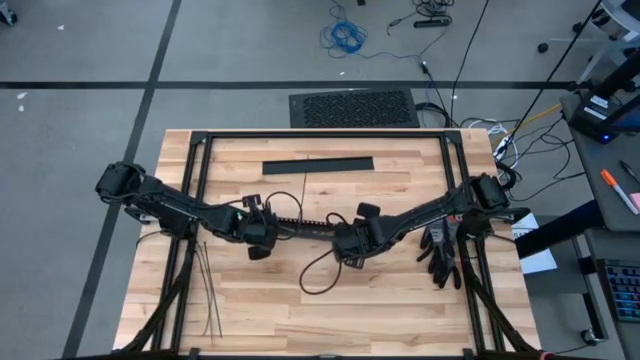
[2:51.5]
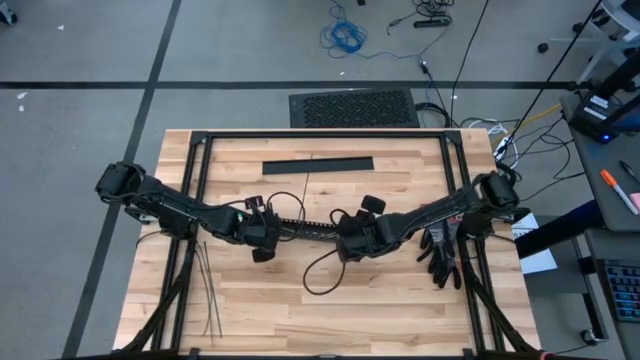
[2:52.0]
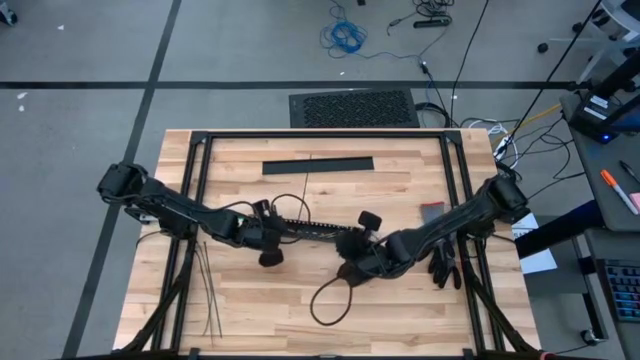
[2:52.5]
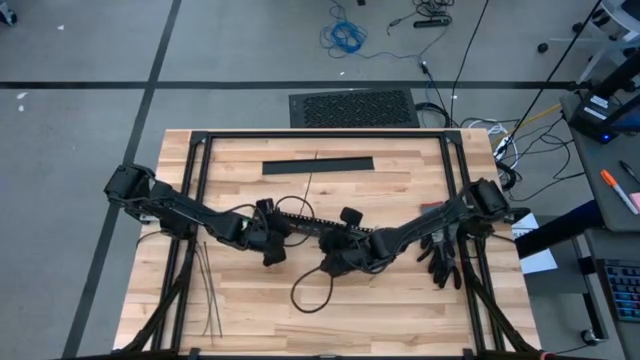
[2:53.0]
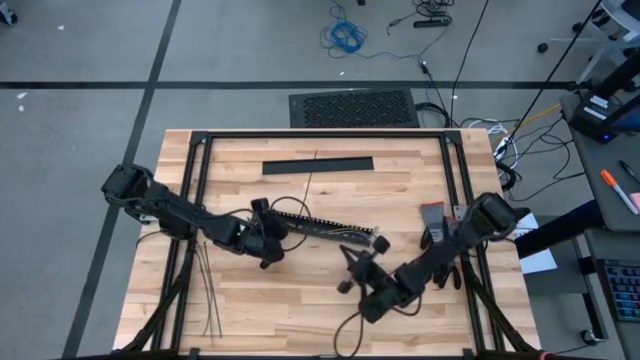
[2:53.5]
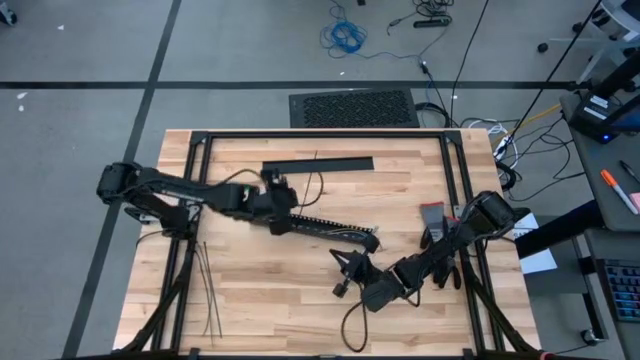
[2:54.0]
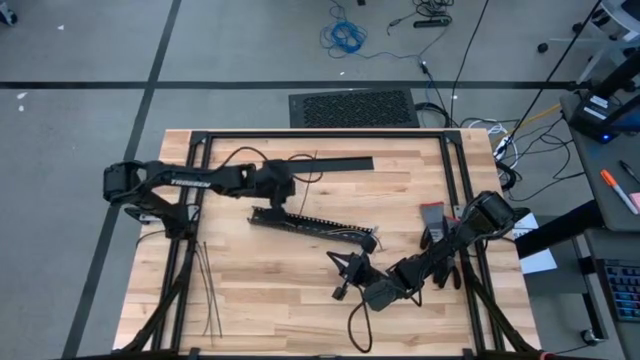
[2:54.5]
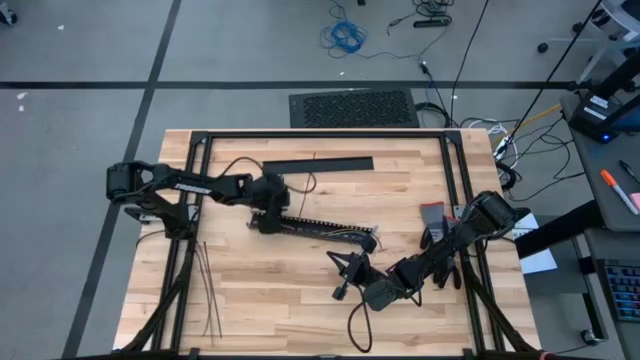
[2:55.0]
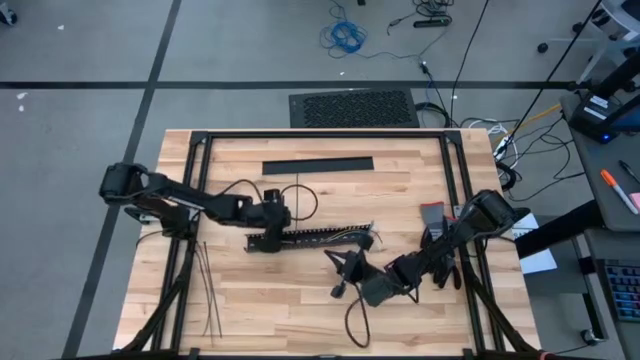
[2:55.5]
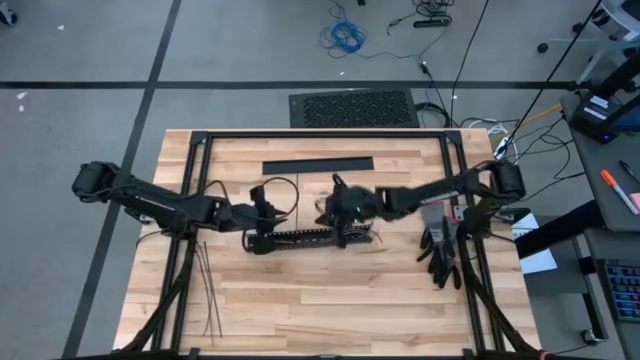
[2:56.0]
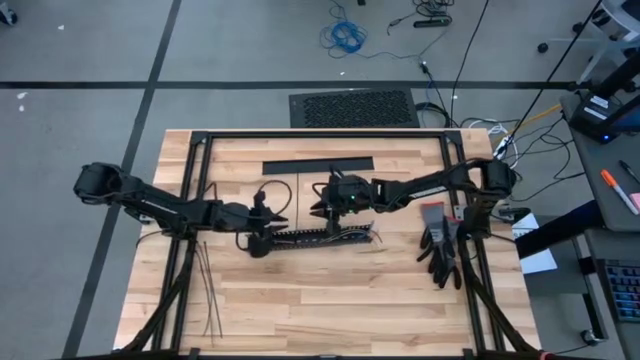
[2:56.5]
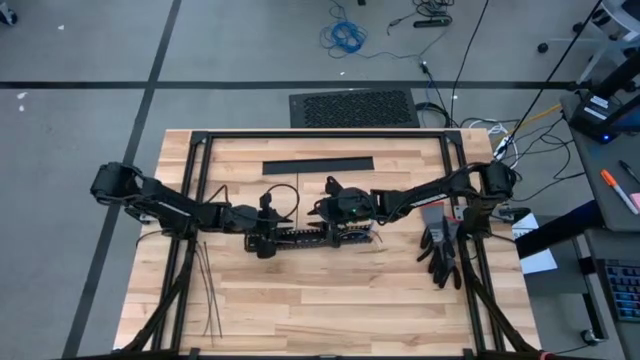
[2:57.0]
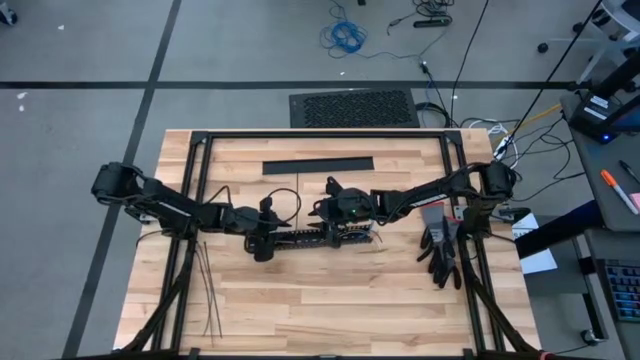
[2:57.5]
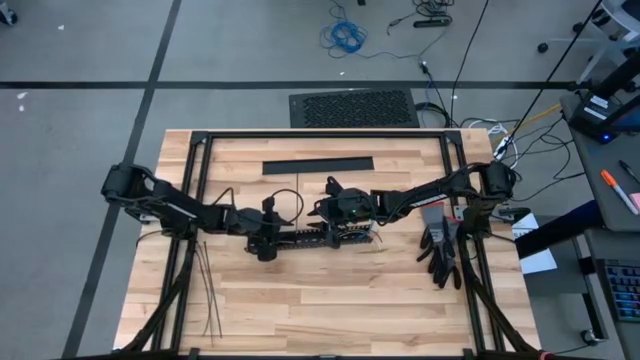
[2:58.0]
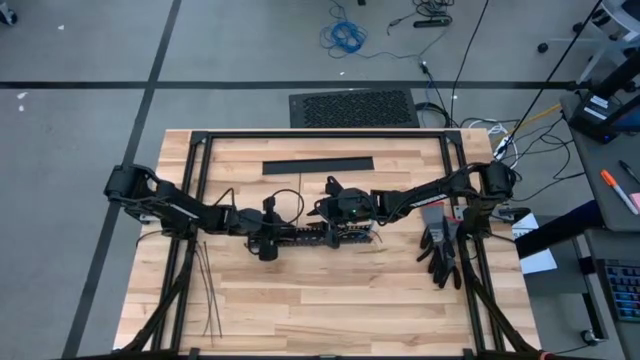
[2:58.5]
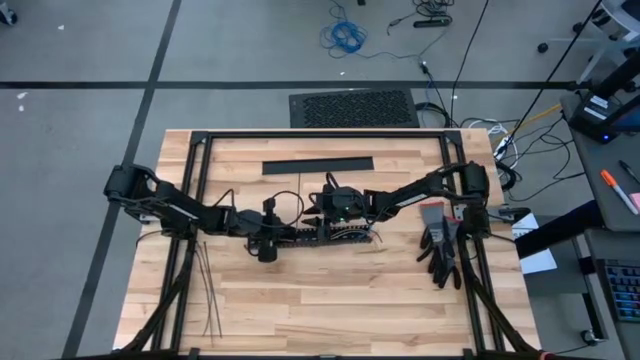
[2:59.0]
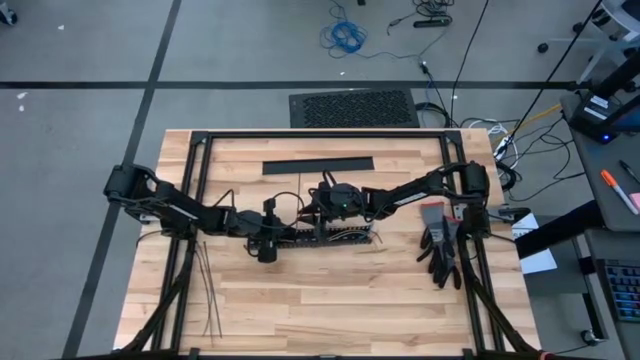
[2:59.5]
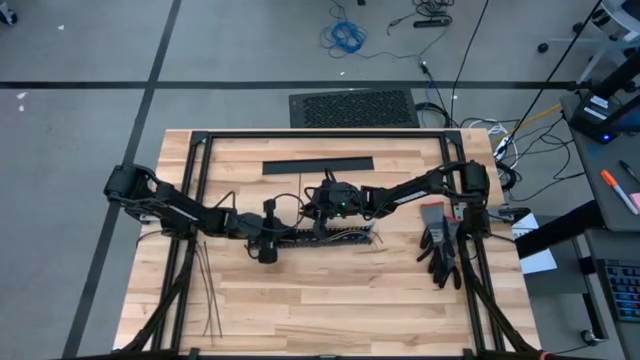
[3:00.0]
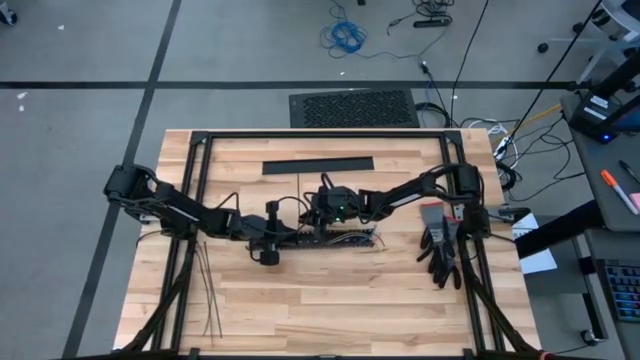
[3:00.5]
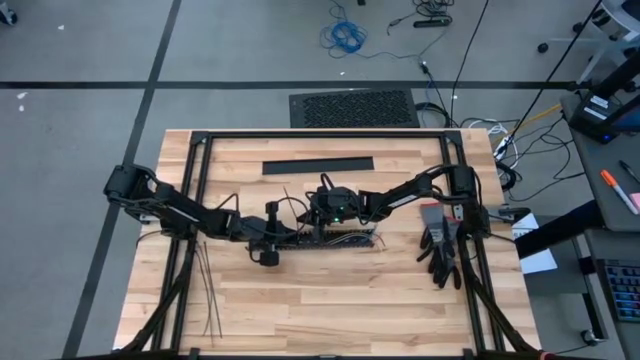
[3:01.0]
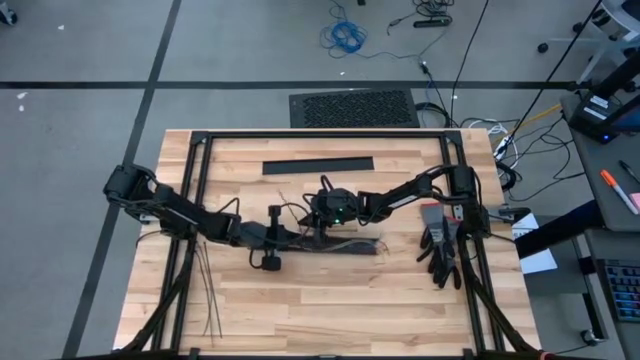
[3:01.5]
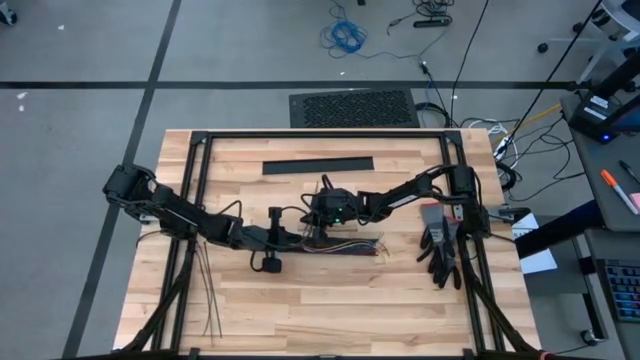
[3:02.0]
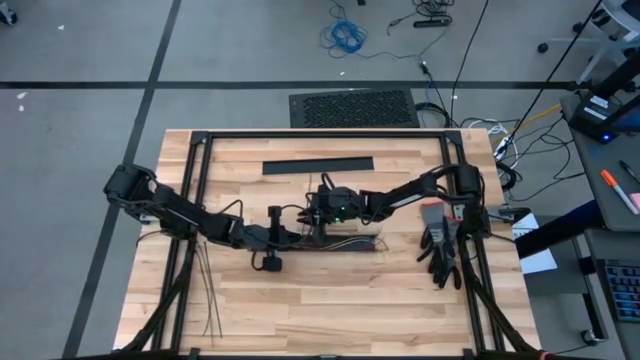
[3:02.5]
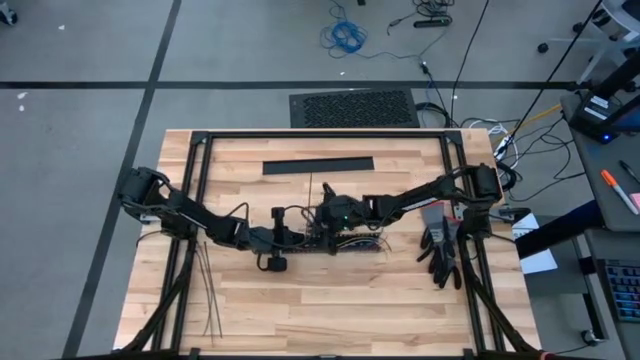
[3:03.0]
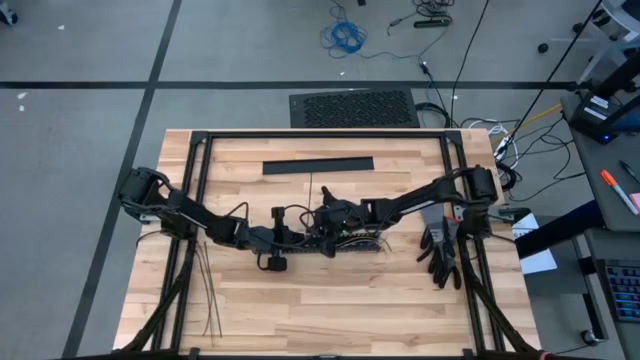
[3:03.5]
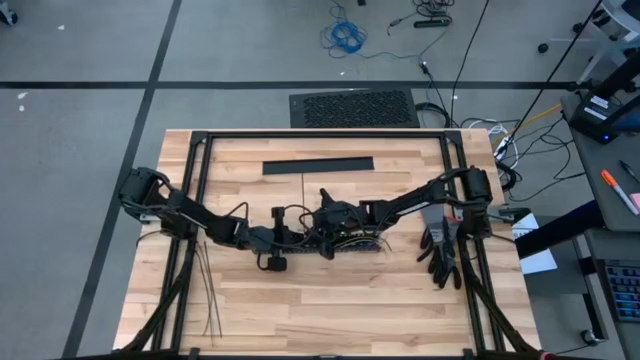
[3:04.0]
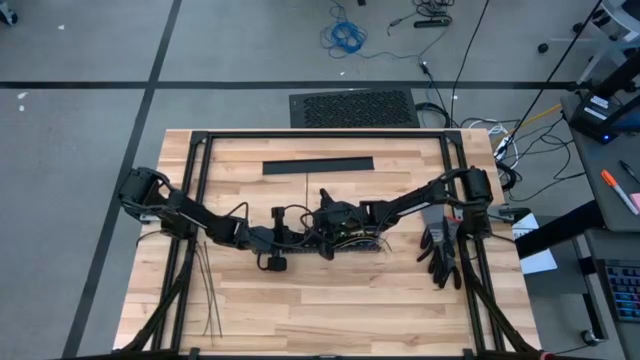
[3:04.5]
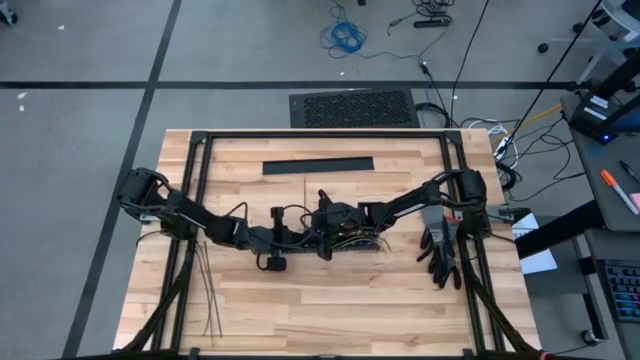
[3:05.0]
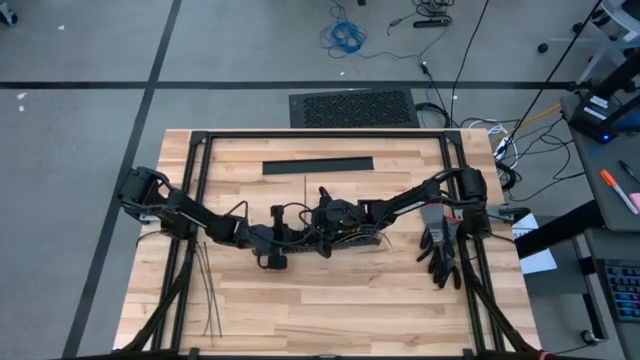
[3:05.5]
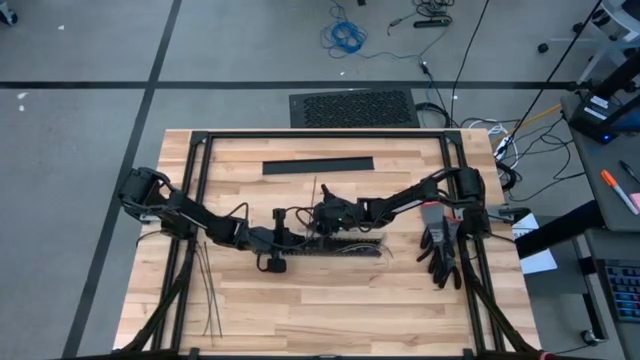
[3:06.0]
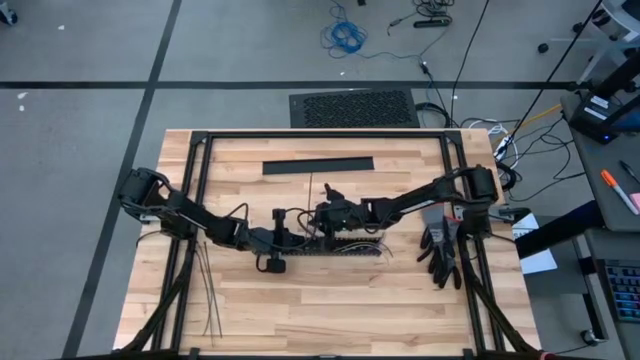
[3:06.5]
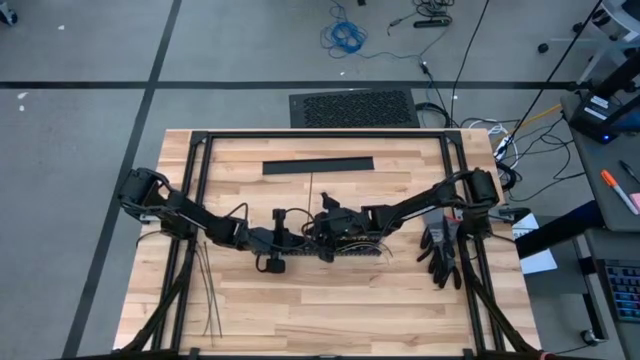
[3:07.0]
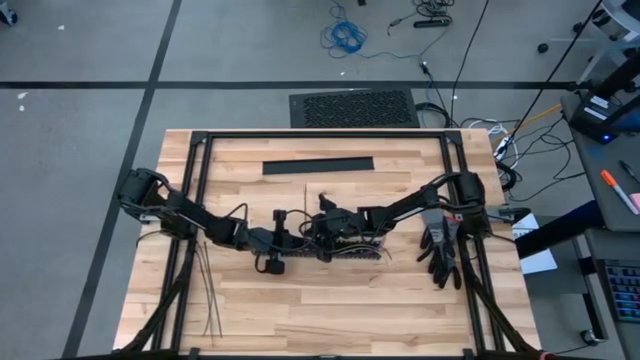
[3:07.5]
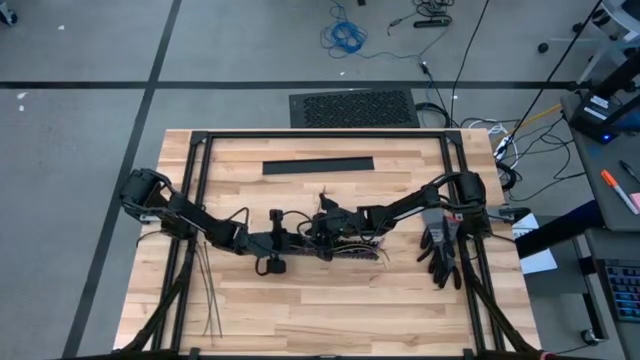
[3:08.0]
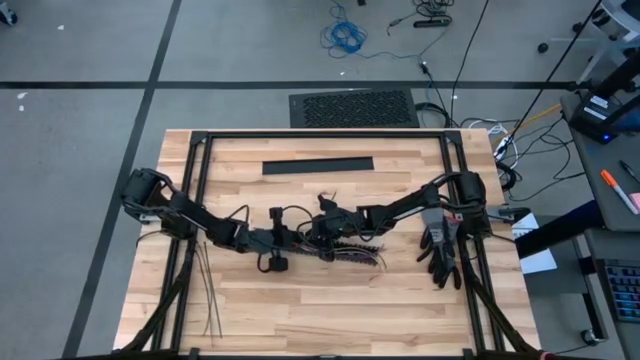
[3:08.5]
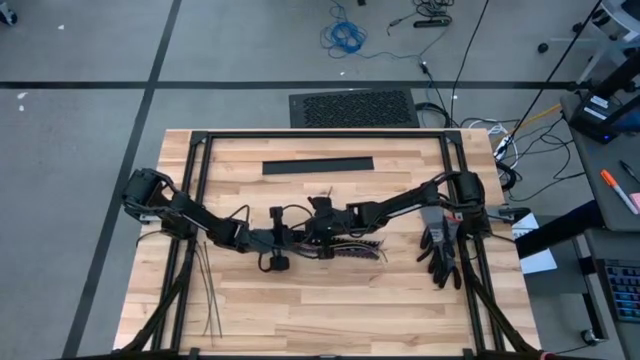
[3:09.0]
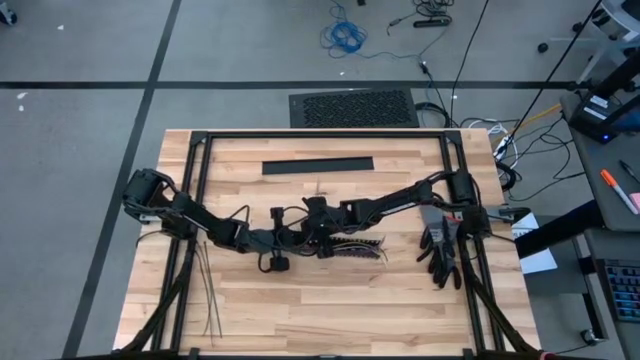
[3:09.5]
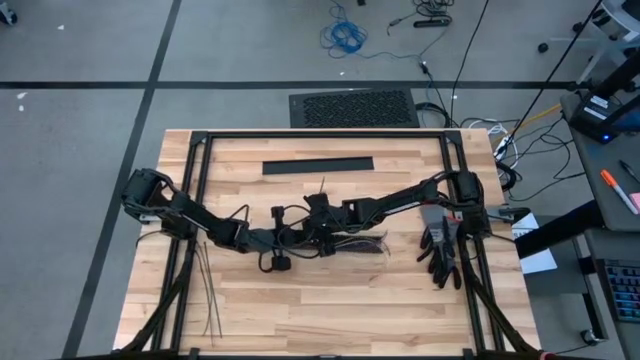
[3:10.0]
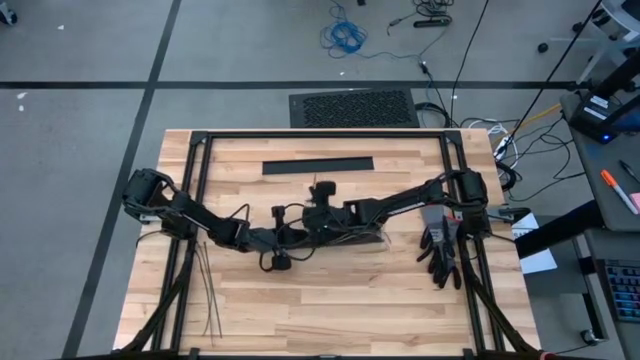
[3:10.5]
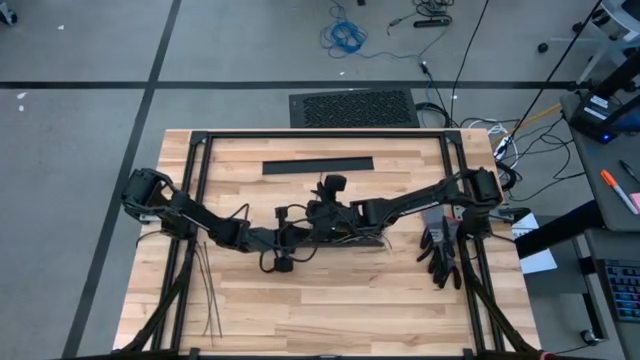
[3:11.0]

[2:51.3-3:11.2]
Task: Ziptie cables
Put the zip-tied cable into the black cable duct
